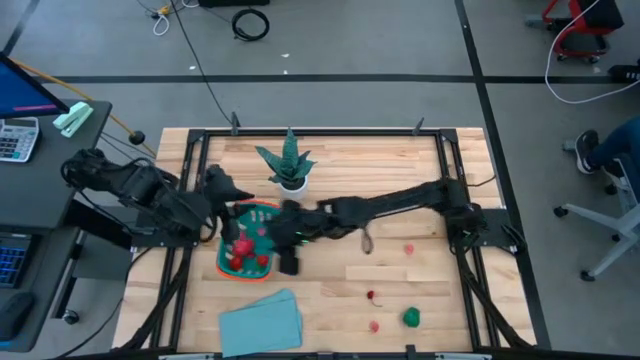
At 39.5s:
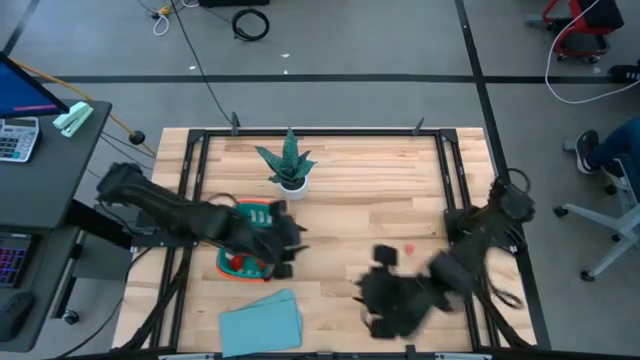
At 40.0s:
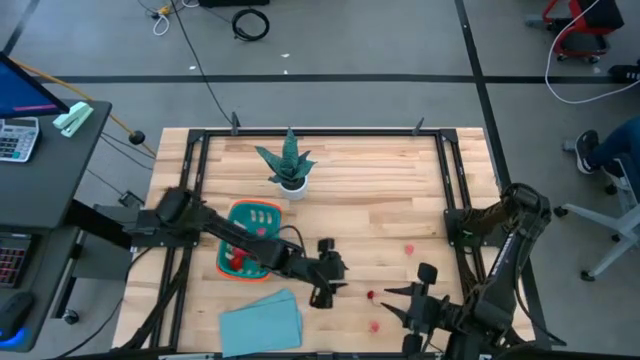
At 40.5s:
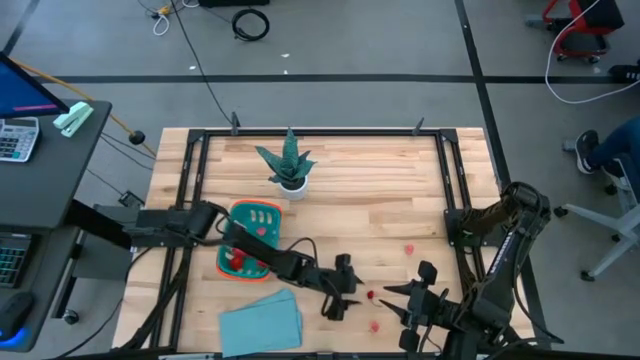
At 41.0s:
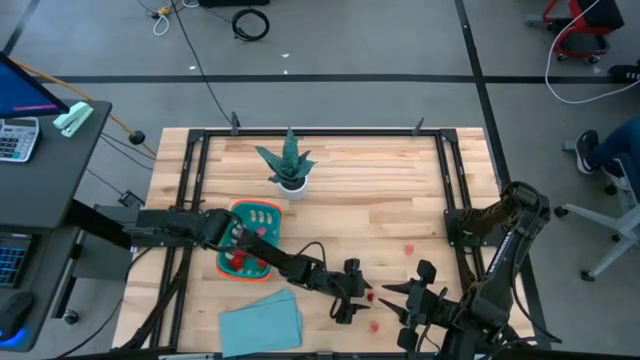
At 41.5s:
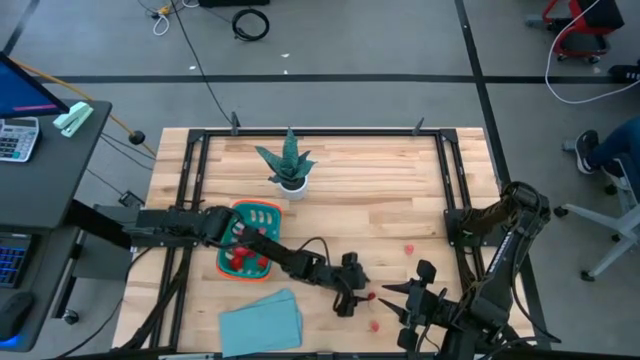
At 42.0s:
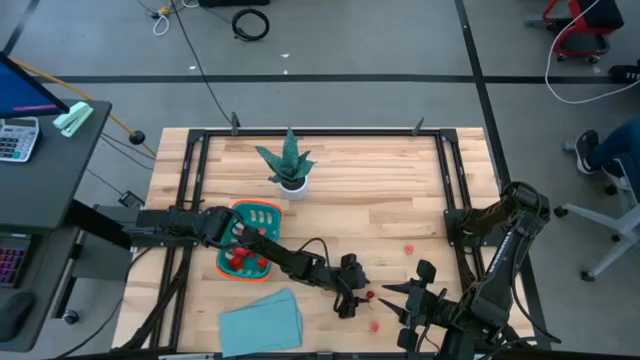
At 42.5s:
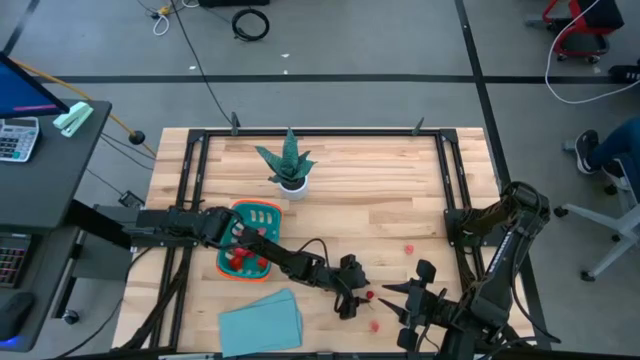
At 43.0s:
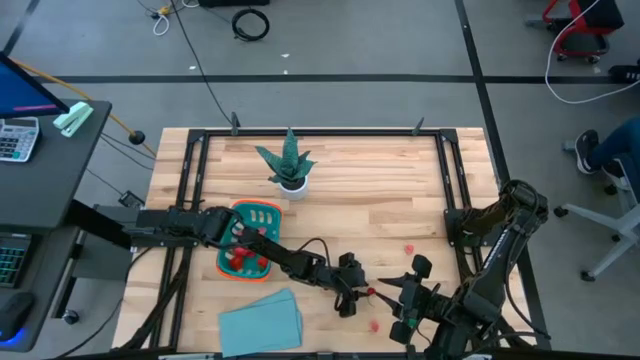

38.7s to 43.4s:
Task: Pick and placing Produce into tupperware
Put the red cherry into the blue basket

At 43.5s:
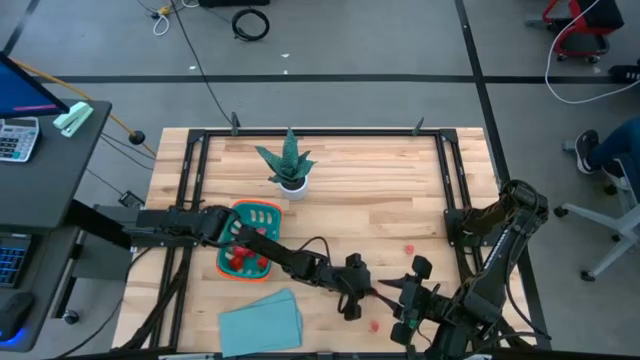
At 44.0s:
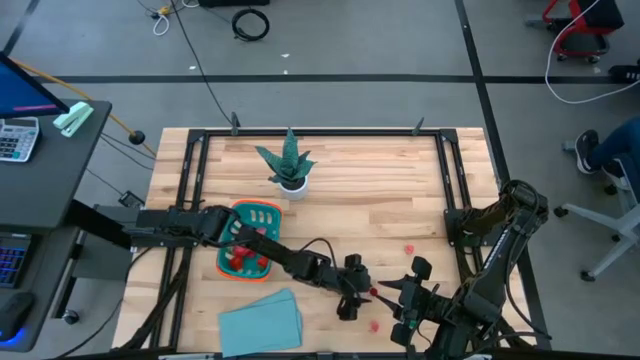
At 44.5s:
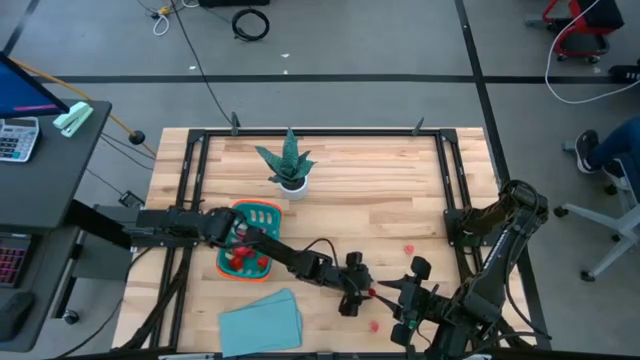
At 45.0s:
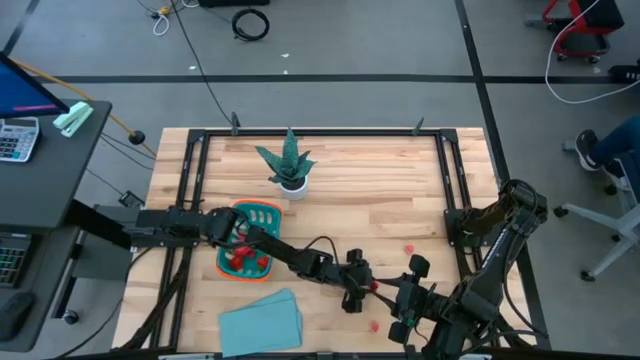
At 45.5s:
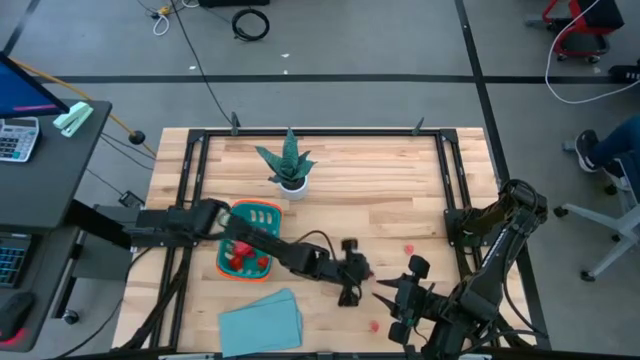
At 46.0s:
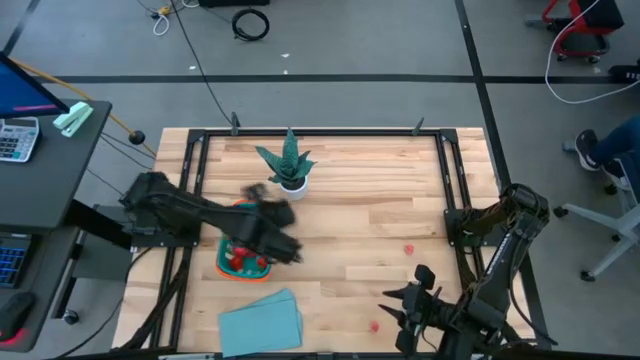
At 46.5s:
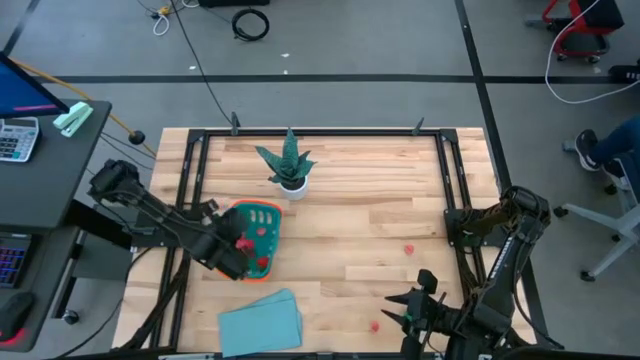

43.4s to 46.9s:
Put the red cherry into the blue basket

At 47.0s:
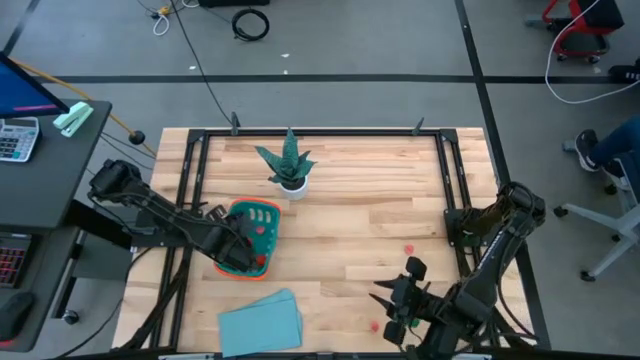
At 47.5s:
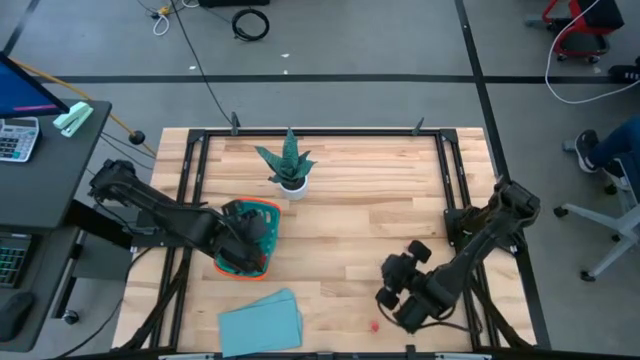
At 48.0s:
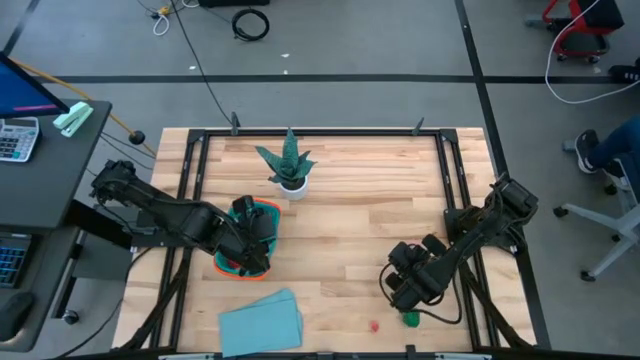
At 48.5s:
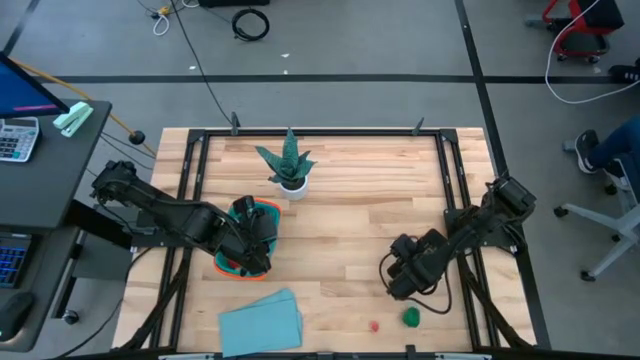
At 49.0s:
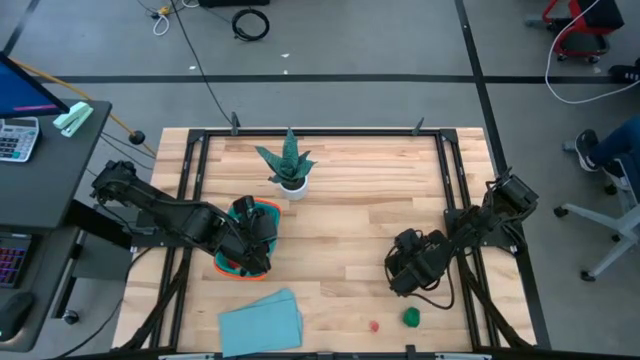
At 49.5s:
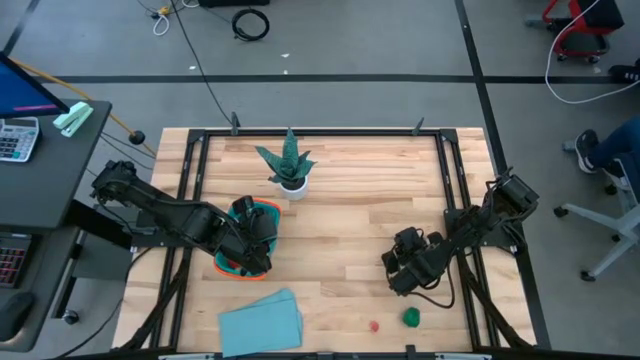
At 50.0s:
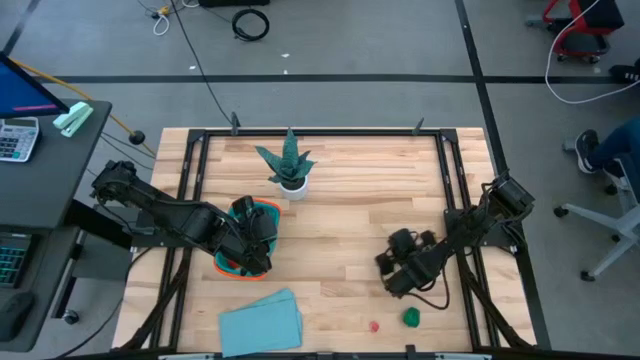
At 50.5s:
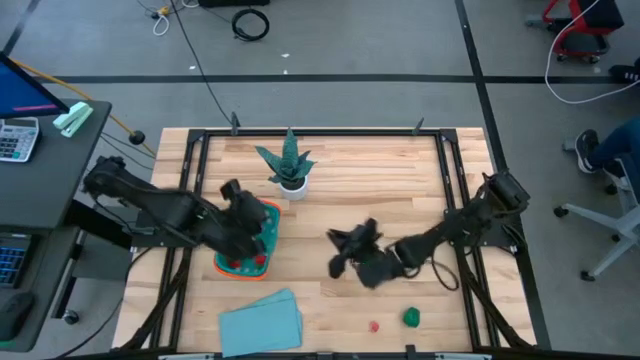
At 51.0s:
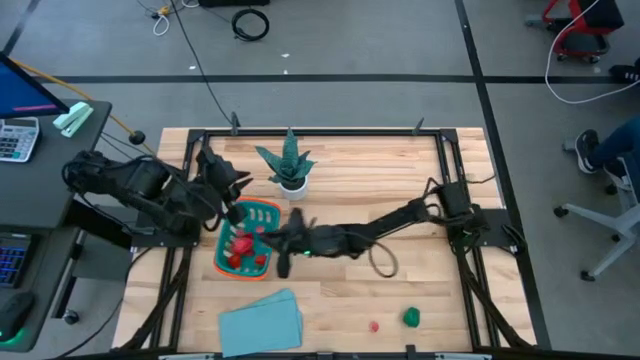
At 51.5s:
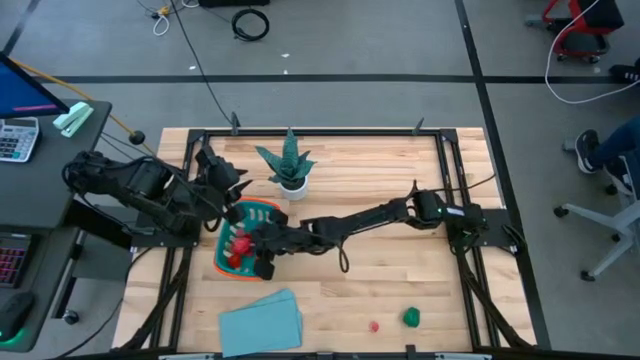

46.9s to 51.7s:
Put the pink peach into the blue basket

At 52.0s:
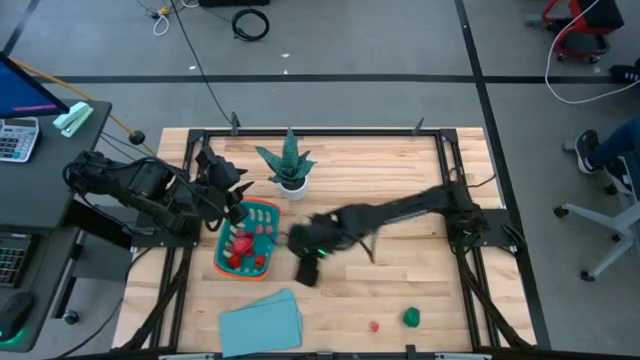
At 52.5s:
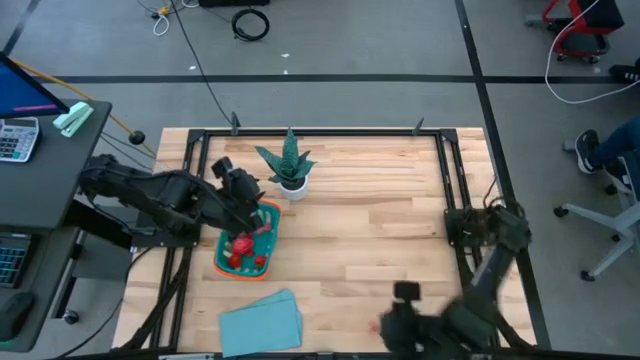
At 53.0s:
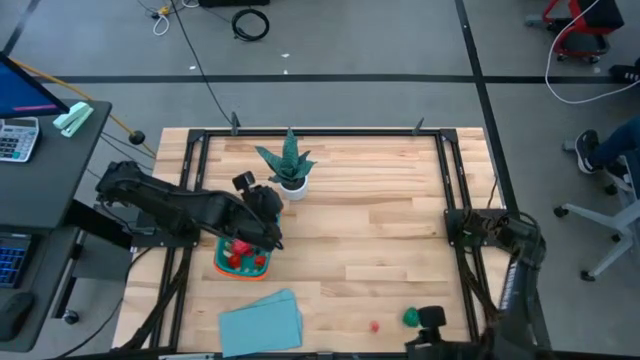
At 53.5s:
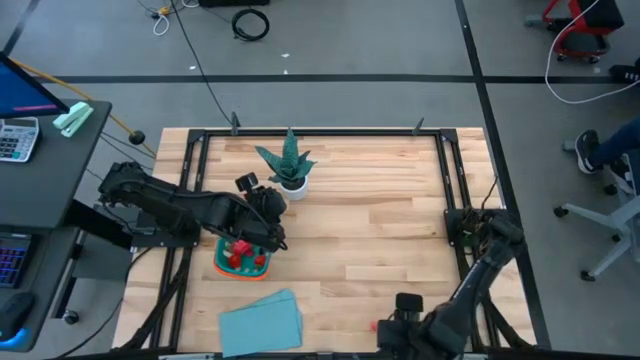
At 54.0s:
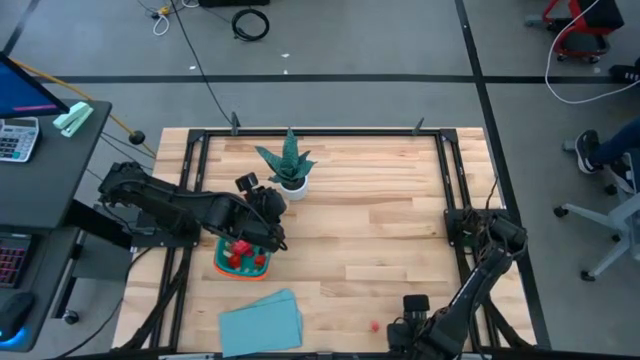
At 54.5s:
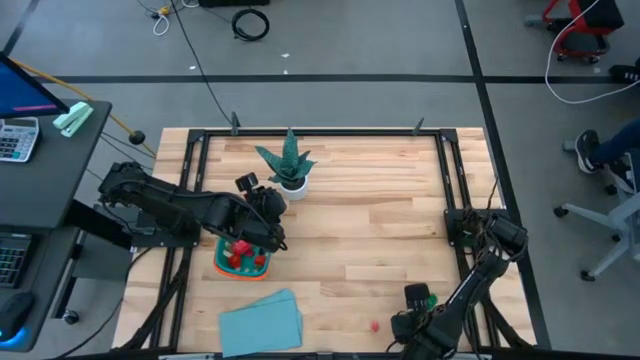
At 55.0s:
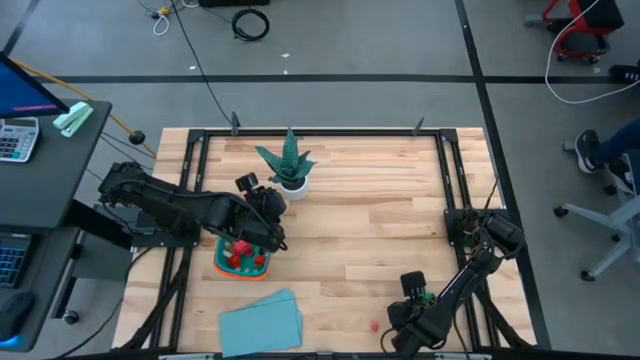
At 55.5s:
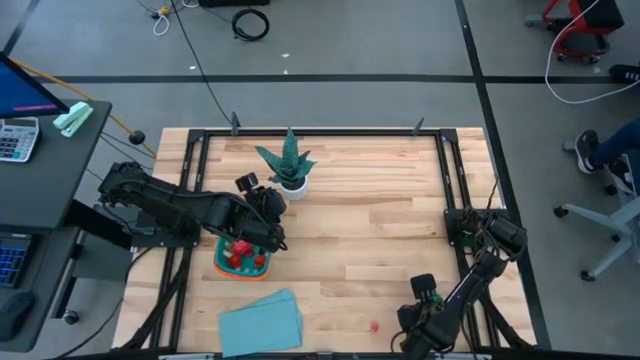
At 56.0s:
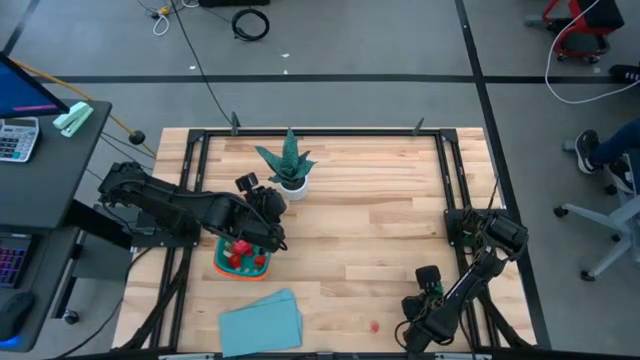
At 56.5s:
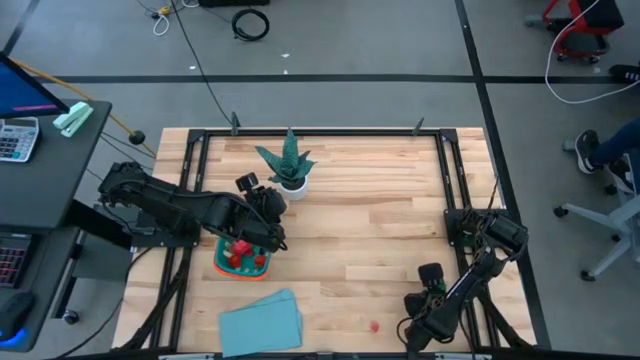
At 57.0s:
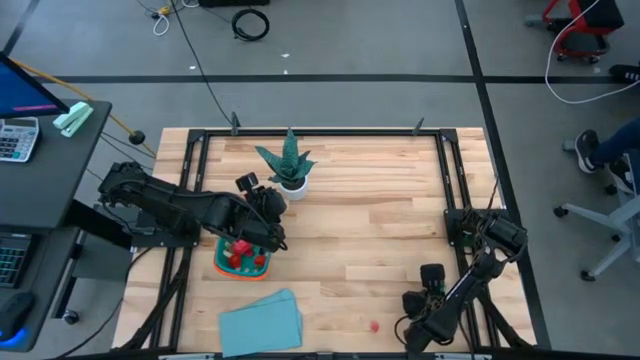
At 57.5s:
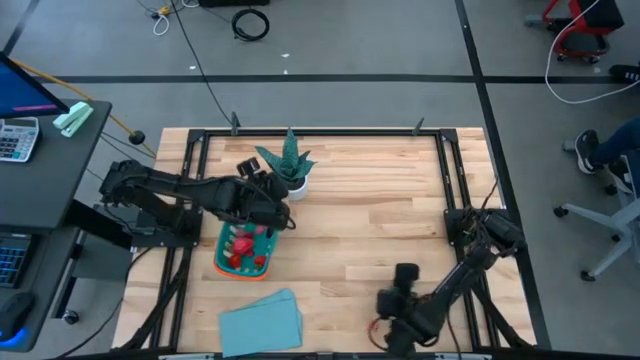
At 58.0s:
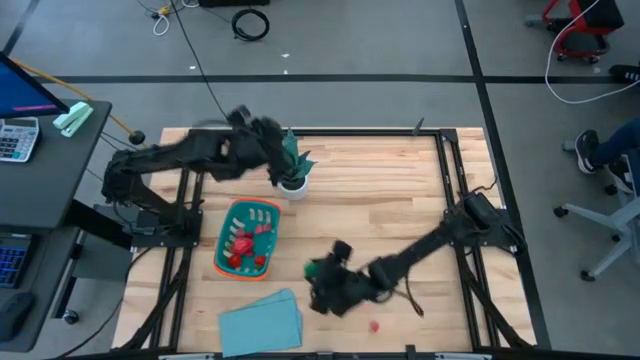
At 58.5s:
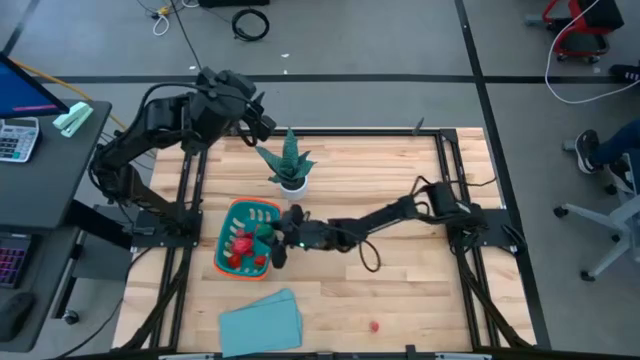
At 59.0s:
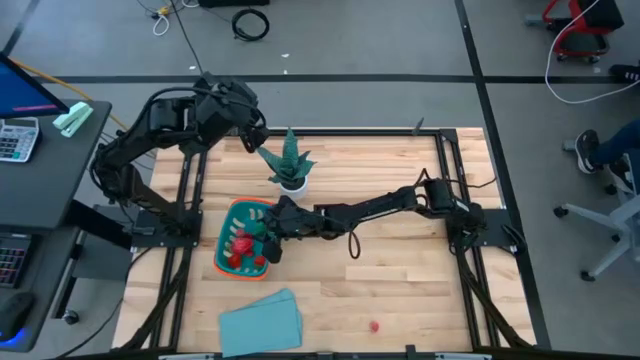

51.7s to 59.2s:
Put the green bell pepper into the blue basket

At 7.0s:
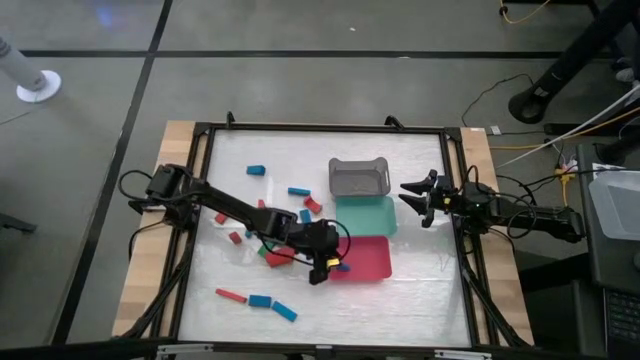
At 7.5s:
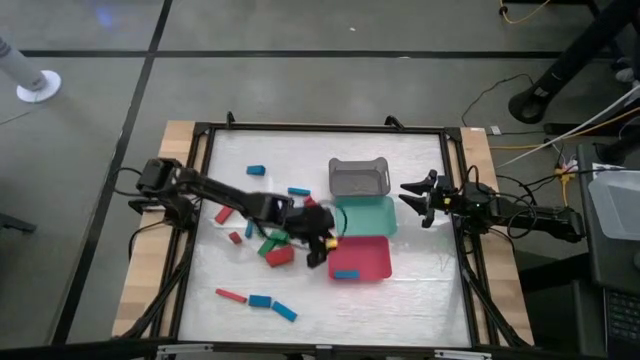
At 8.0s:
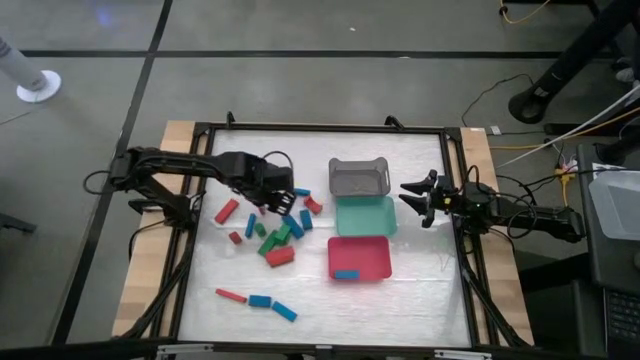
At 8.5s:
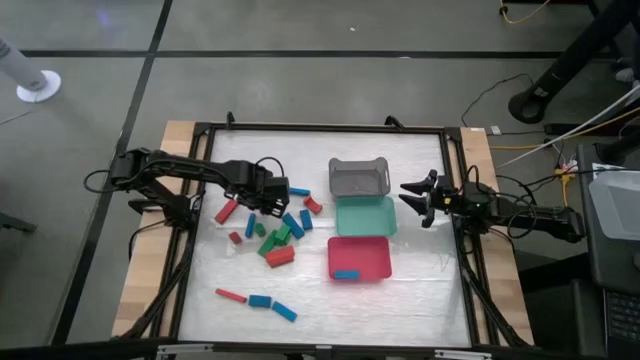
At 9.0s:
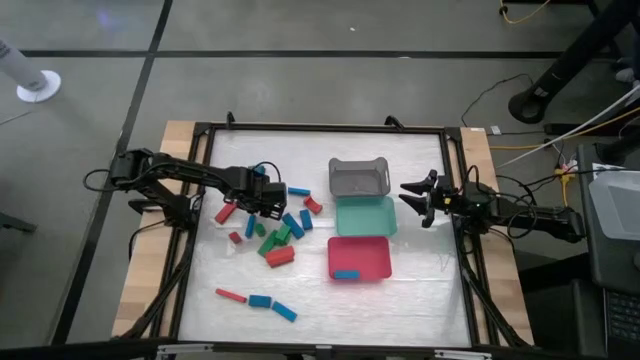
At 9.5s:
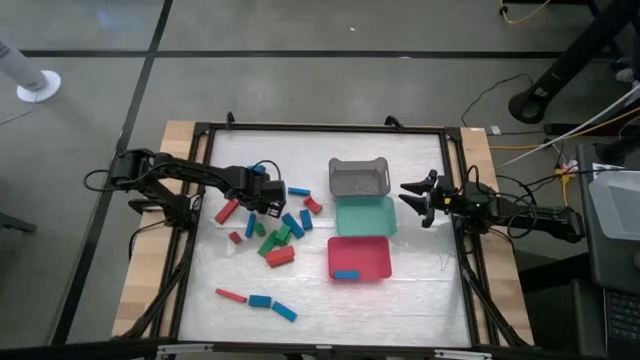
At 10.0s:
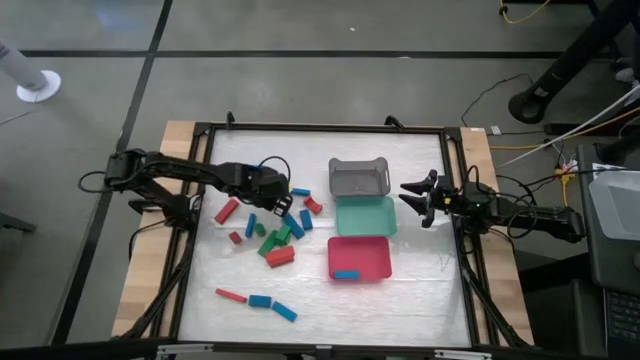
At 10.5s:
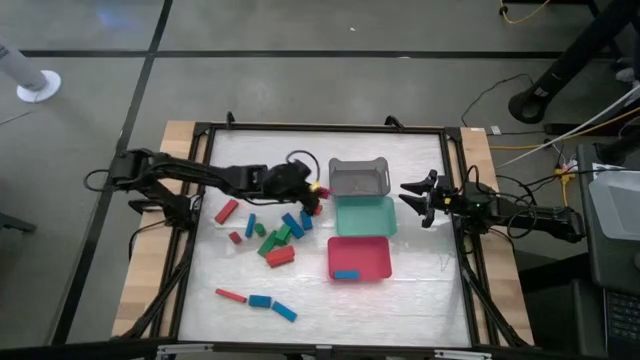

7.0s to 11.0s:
Task: Sort blocks
Put the red block into the green bin
